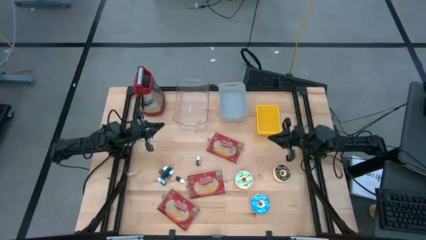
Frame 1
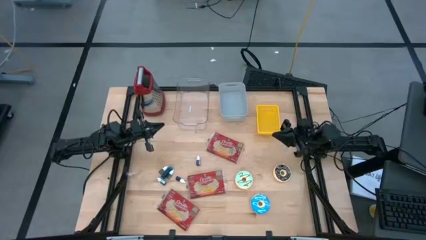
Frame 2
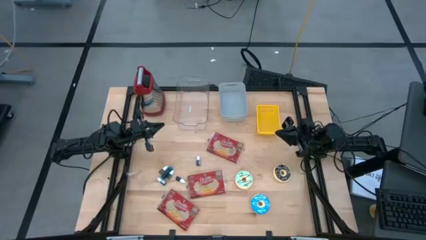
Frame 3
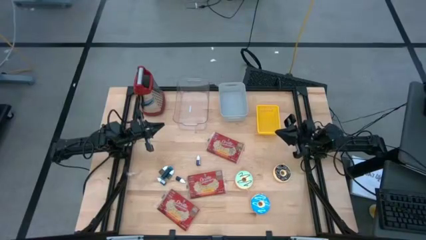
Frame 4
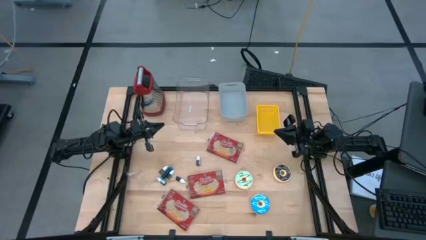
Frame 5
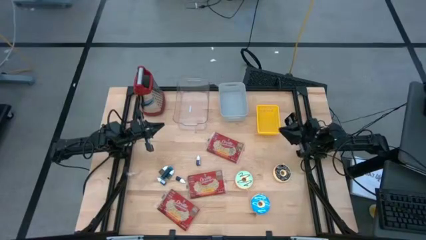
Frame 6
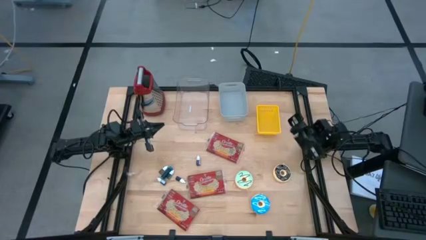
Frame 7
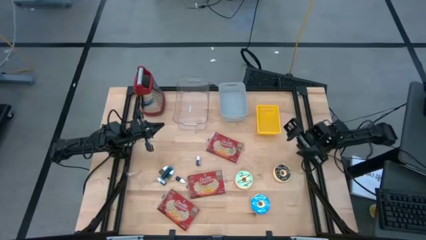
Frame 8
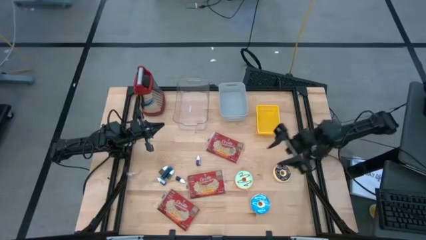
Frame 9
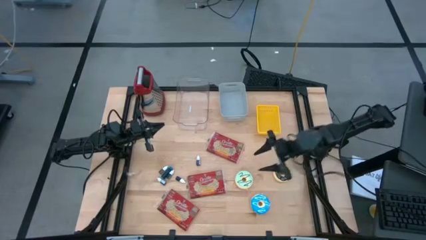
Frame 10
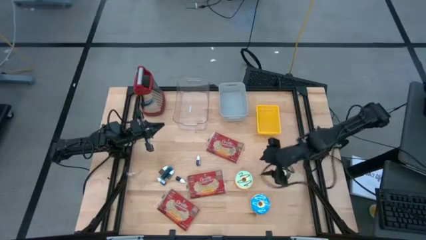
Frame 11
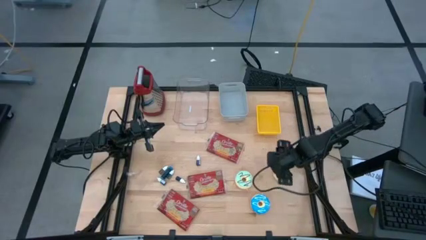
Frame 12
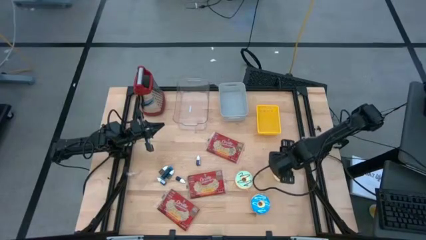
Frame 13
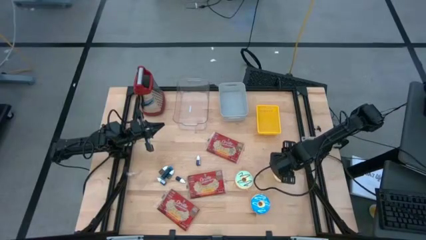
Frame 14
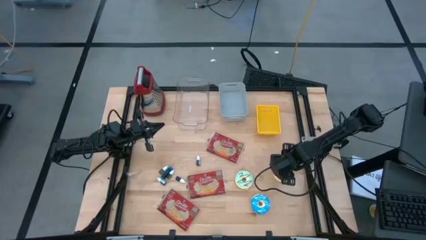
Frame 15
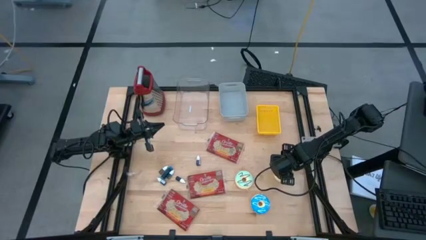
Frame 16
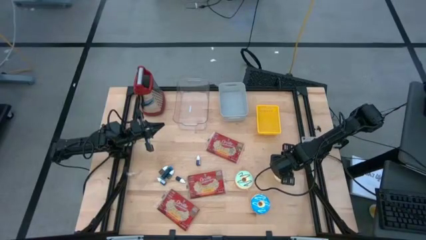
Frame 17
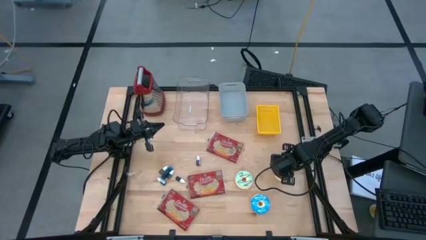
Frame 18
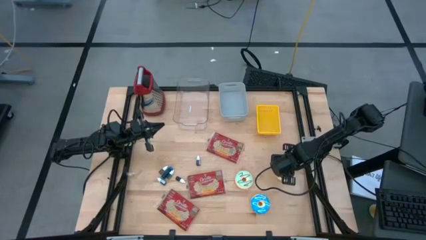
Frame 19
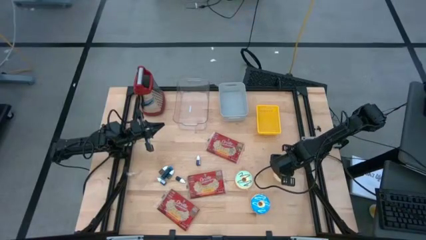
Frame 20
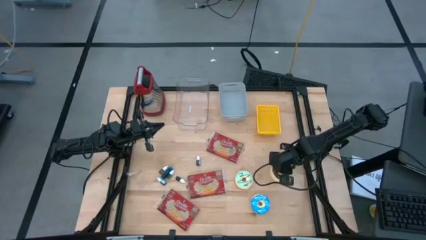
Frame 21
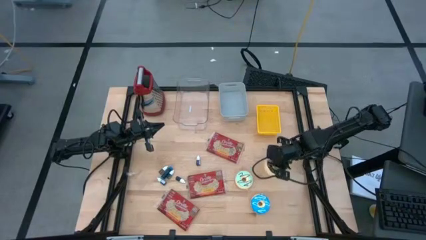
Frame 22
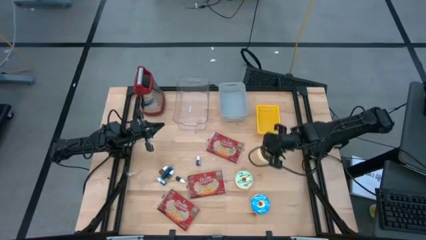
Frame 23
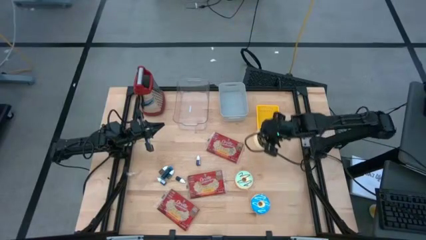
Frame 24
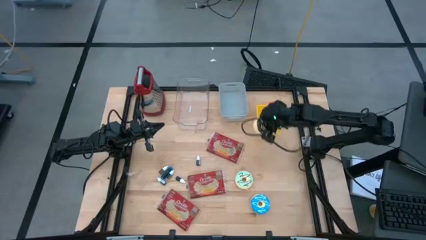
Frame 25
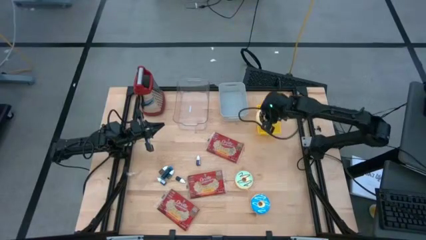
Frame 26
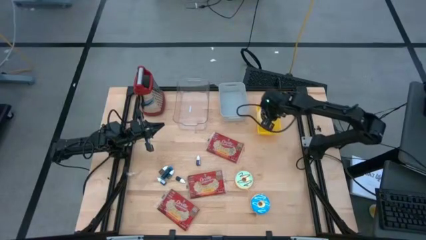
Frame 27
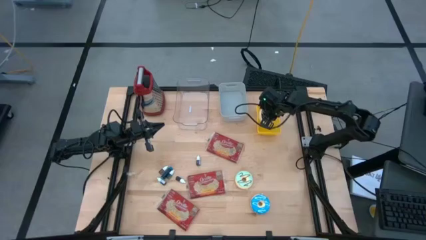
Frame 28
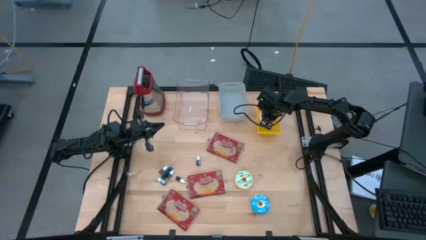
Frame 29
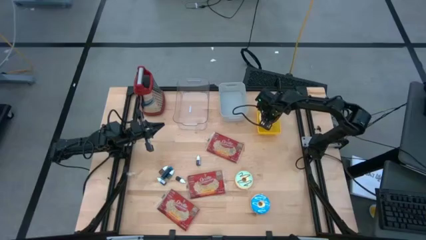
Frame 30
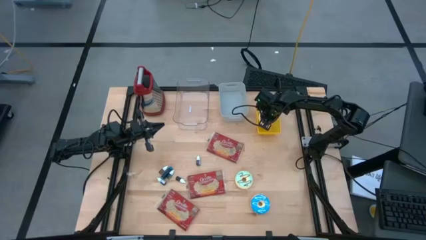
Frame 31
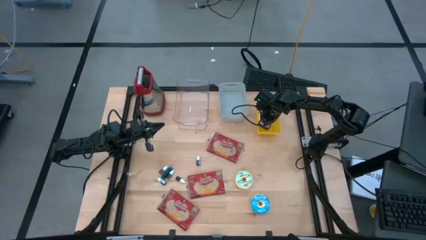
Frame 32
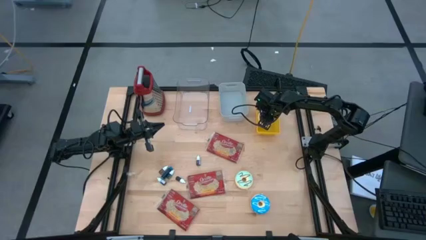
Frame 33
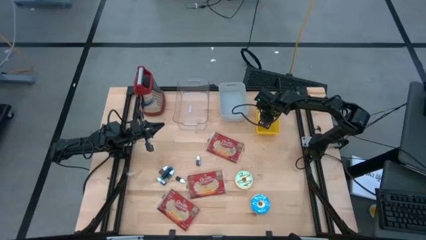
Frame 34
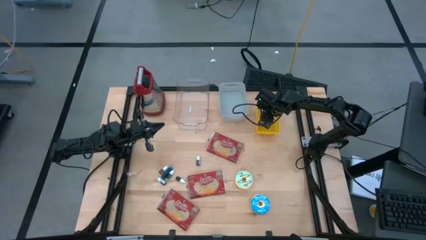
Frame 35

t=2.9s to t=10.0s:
Task: Pick & Place Food Item
Put the black donut into the yellow bin

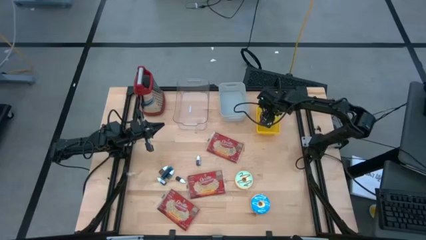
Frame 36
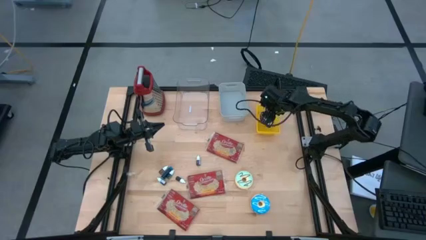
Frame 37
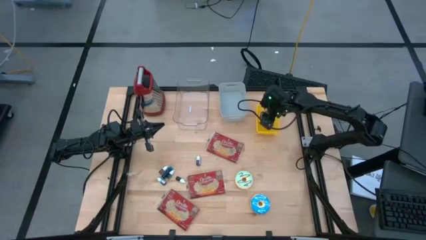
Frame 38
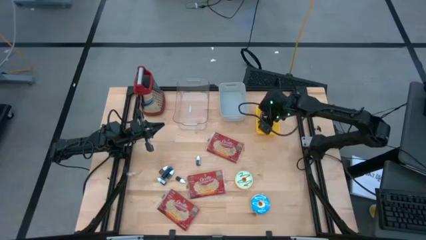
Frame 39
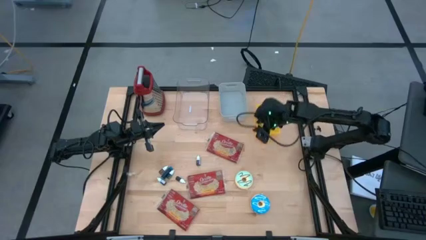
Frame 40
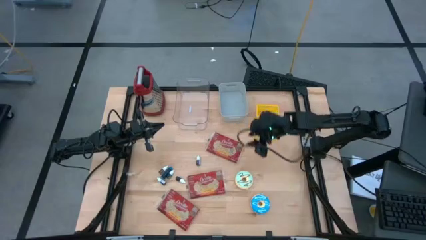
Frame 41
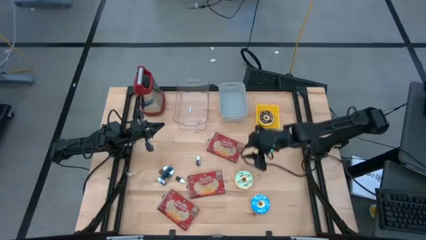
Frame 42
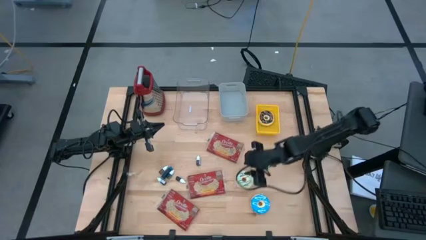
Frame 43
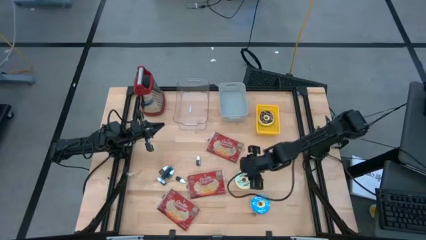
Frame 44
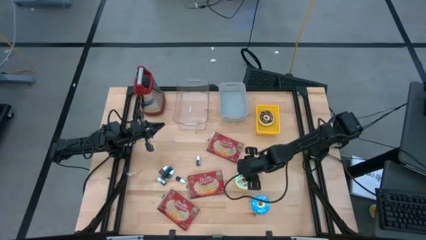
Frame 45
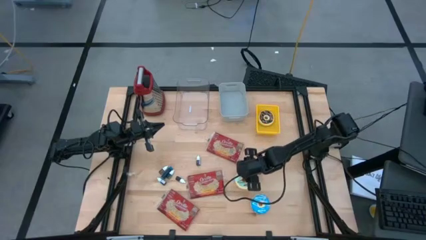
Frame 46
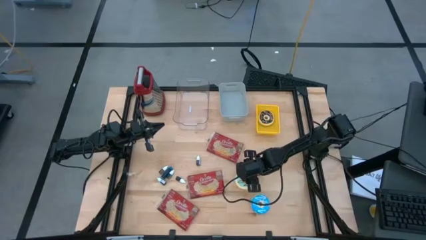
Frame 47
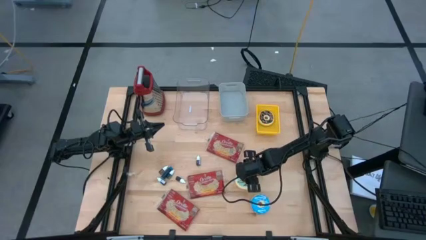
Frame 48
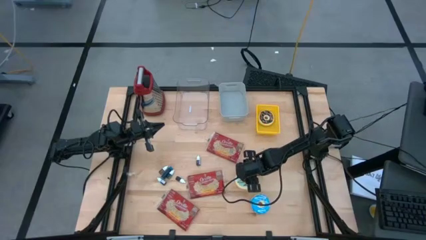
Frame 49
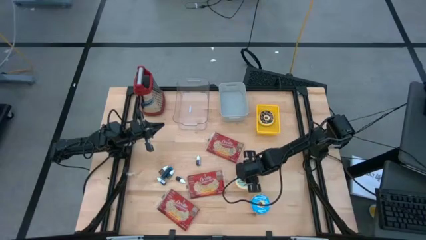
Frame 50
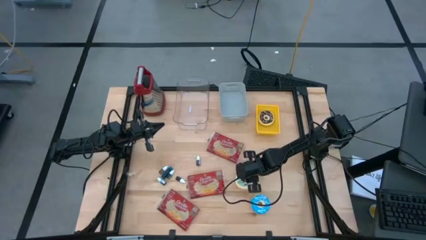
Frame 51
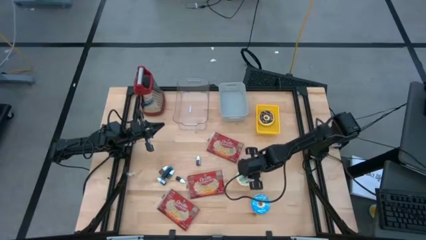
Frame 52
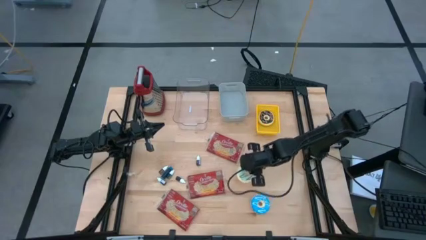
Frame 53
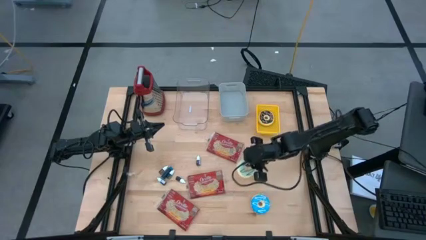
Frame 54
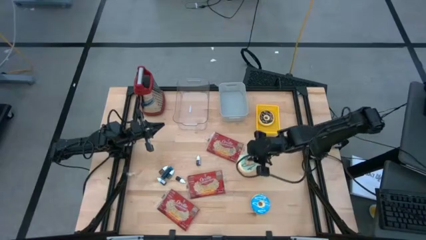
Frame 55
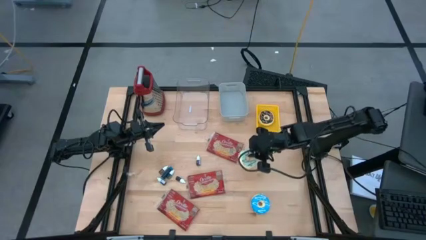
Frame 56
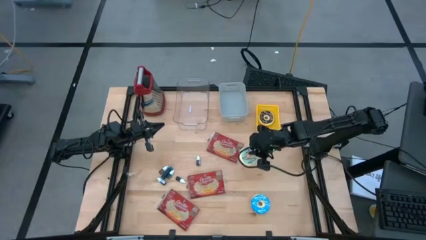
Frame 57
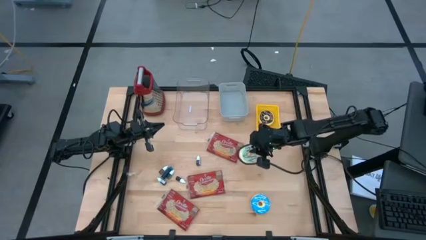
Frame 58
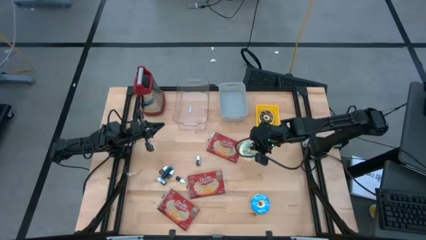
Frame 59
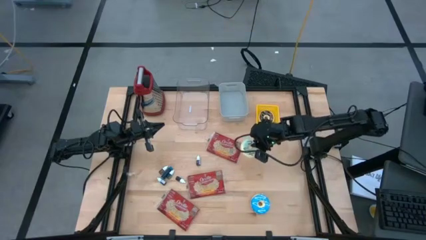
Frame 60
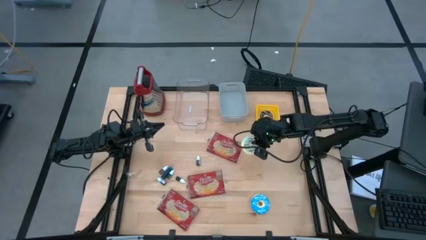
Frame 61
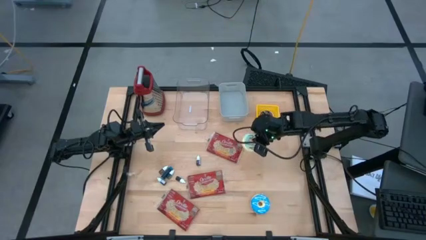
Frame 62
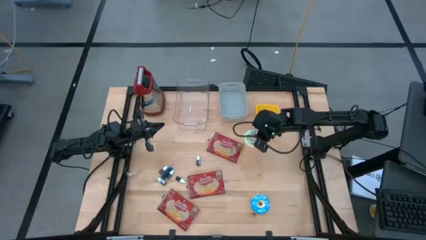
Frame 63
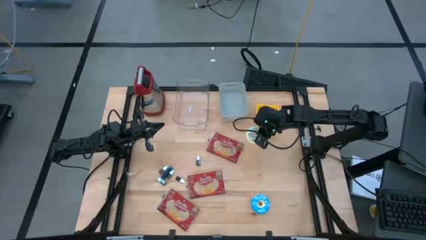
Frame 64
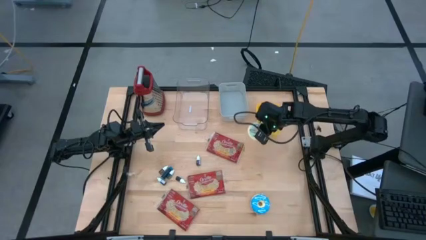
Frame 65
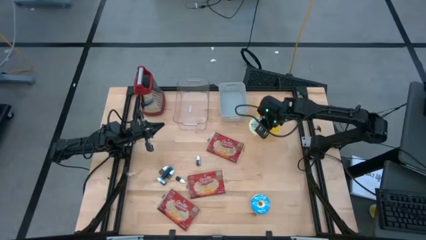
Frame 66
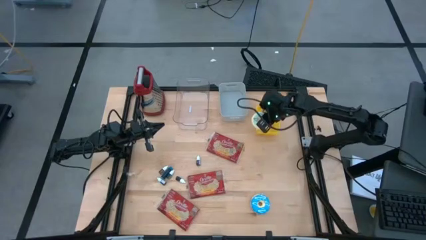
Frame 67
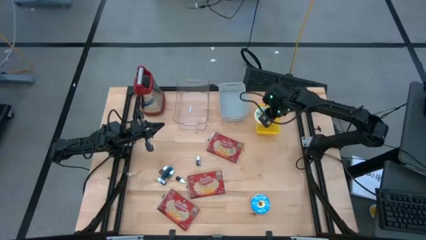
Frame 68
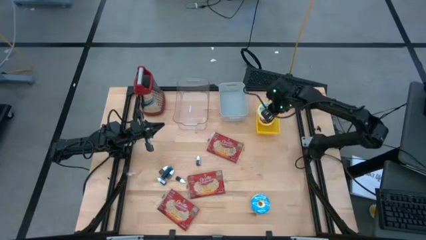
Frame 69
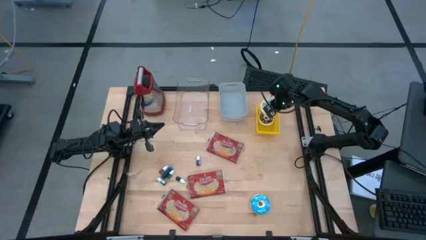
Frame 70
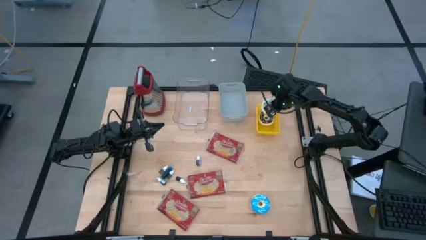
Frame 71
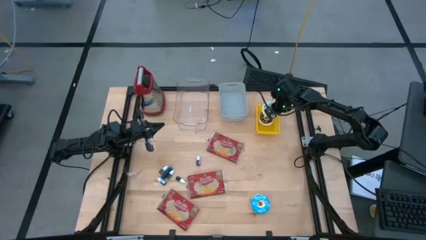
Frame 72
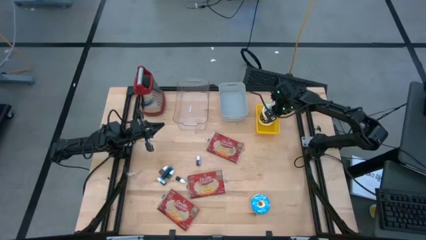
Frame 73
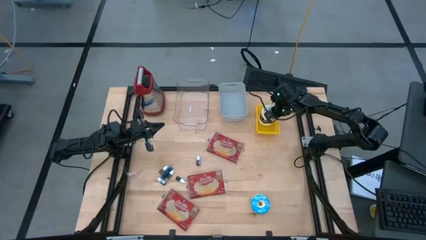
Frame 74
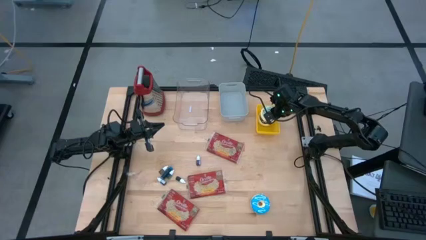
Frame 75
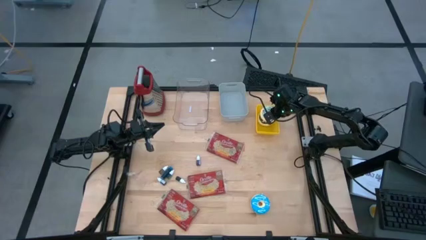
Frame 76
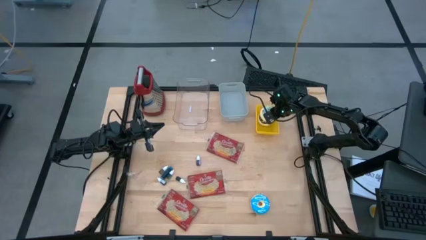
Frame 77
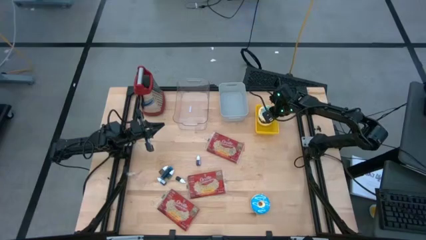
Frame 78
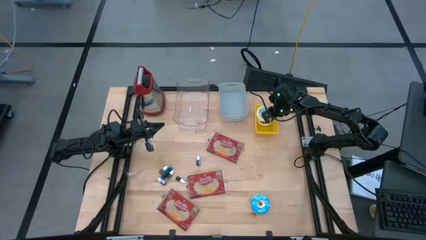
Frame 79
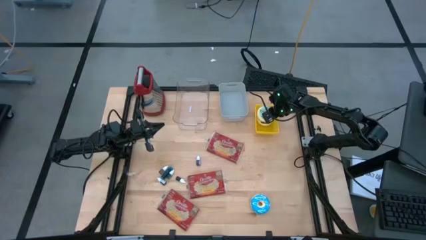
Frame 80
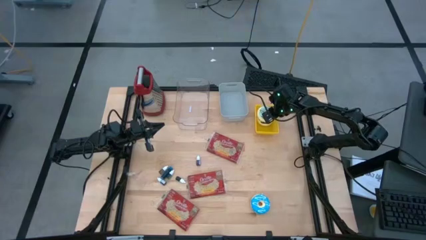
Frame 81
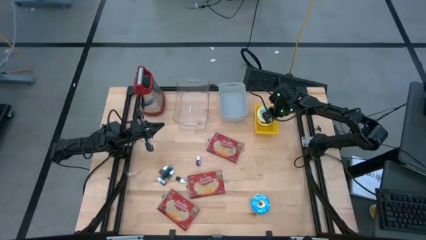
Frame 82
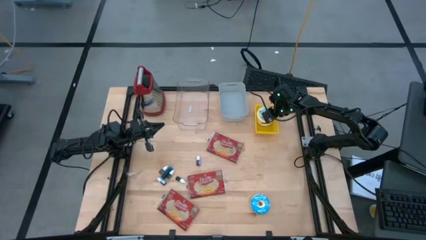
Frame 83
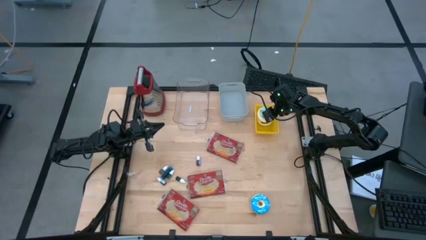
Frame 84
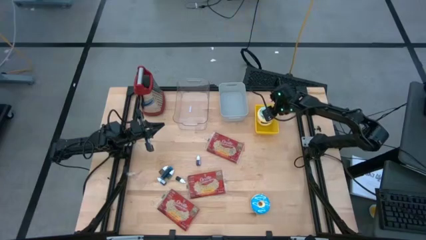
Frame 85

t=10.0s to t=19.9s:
Put the light blue donut into the yellow bin
